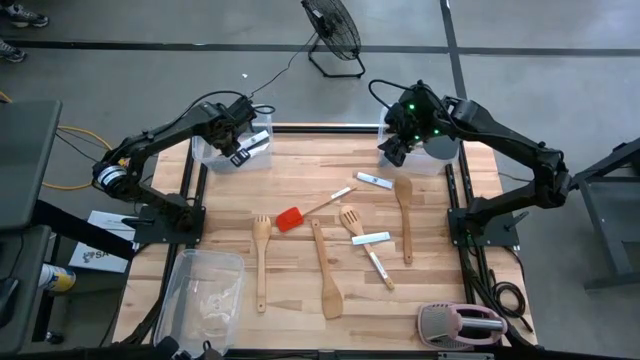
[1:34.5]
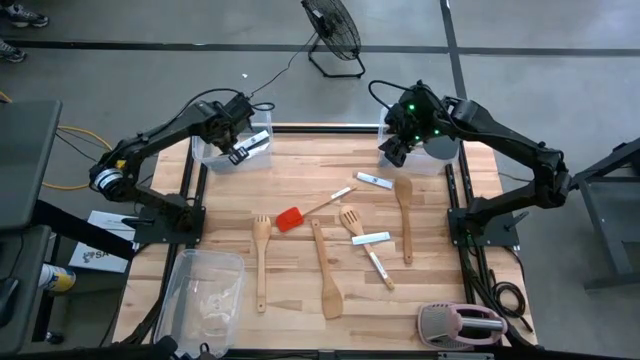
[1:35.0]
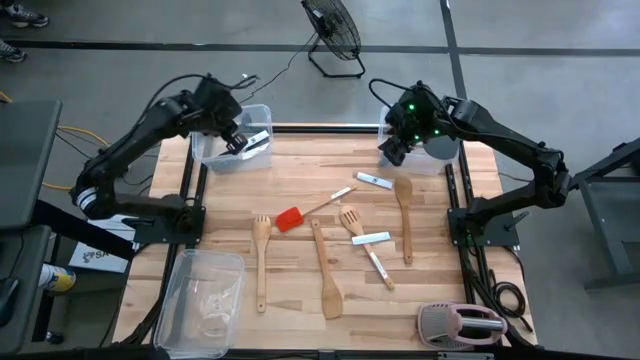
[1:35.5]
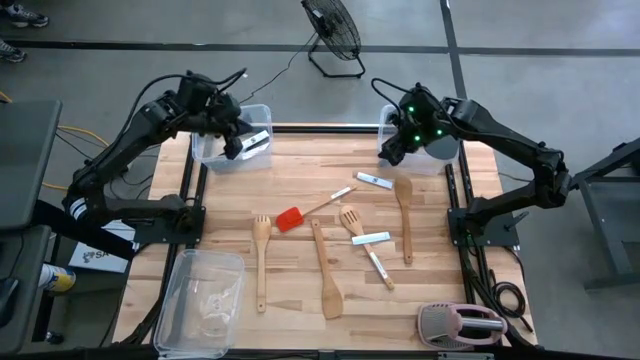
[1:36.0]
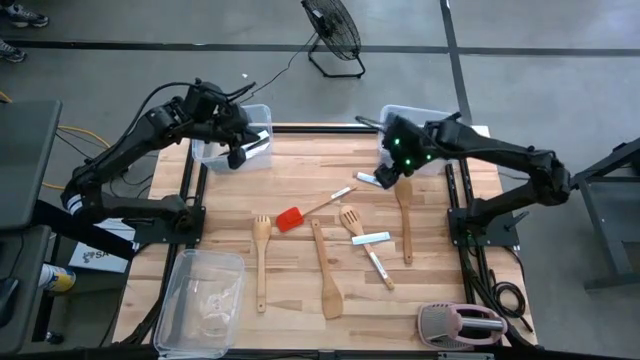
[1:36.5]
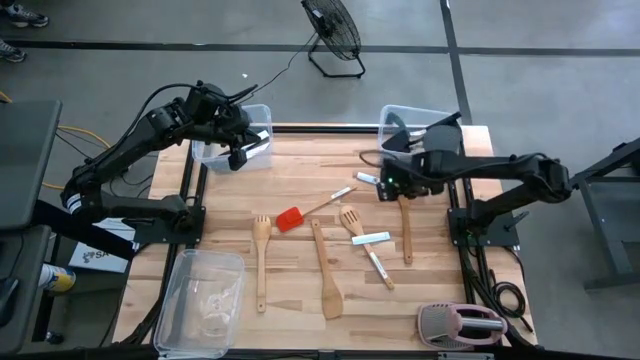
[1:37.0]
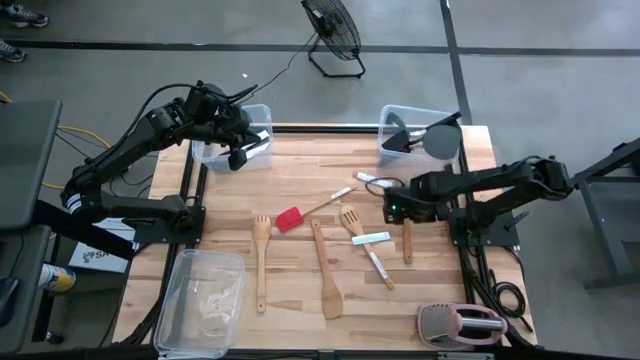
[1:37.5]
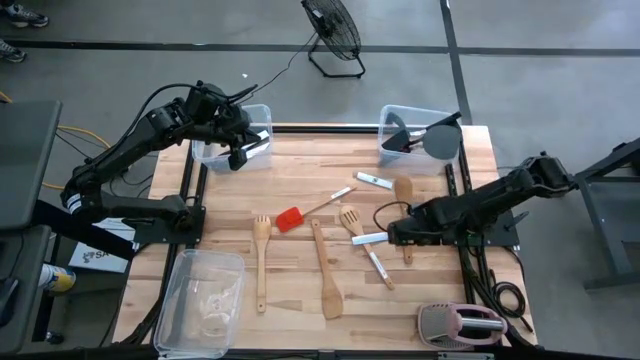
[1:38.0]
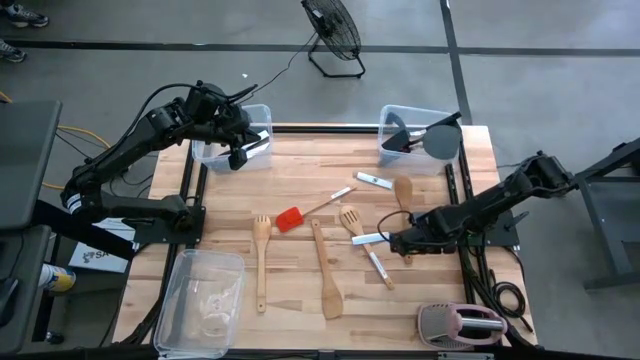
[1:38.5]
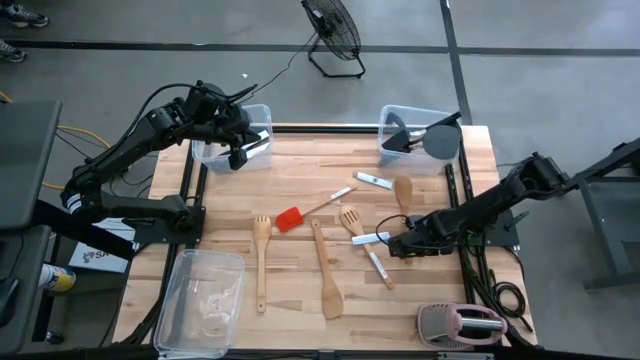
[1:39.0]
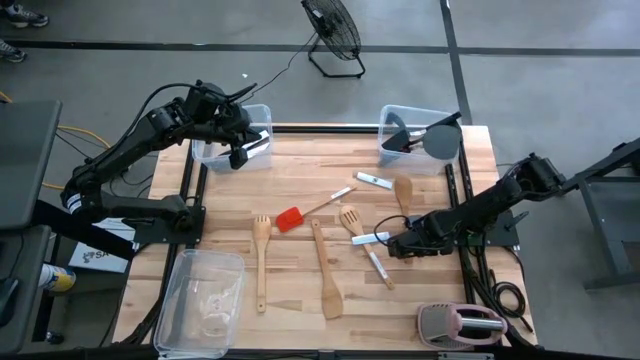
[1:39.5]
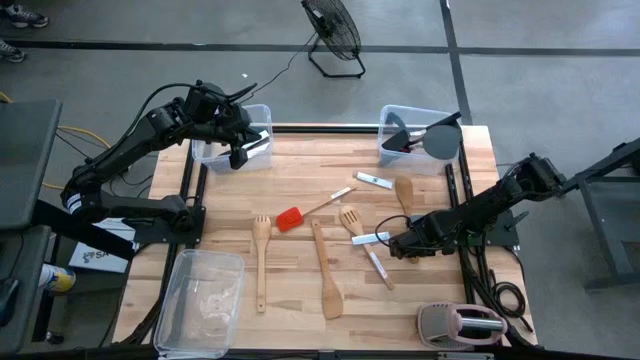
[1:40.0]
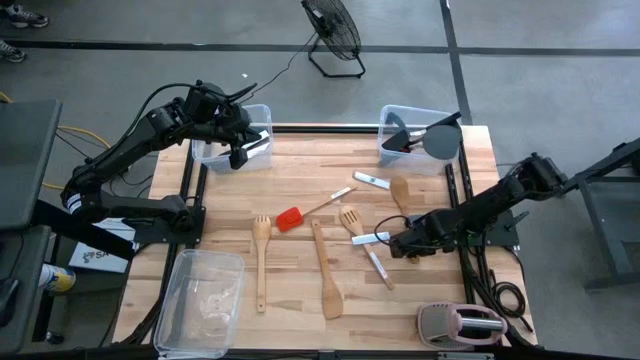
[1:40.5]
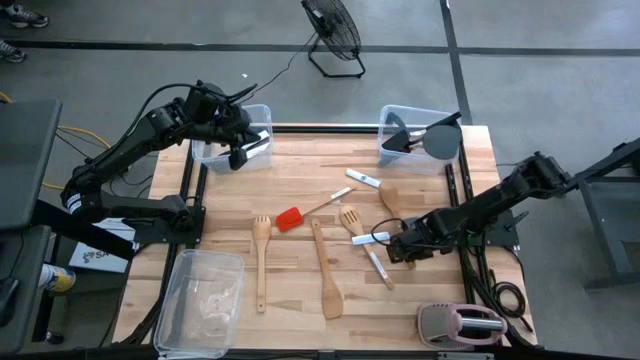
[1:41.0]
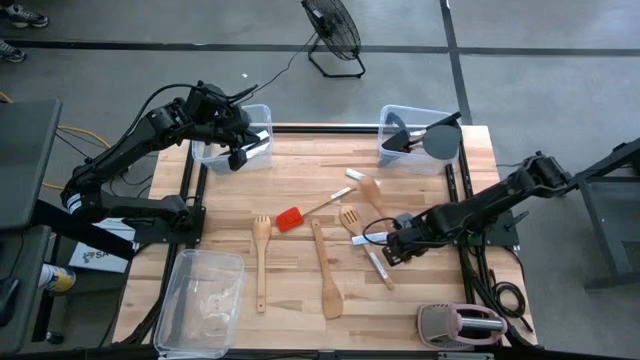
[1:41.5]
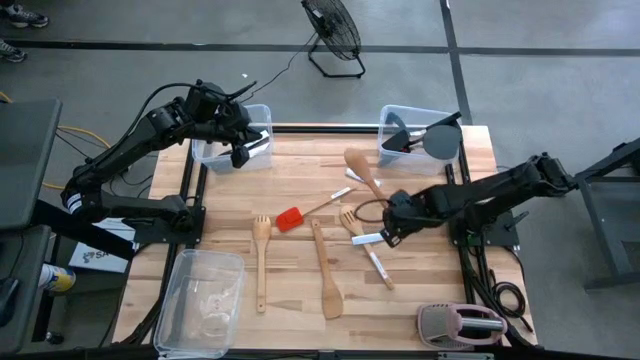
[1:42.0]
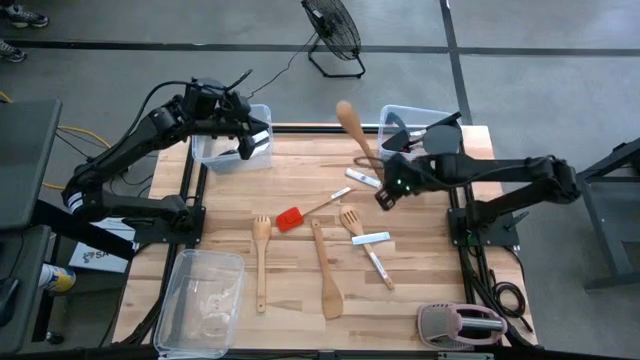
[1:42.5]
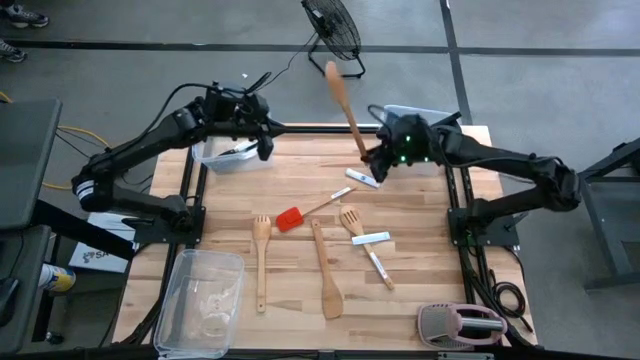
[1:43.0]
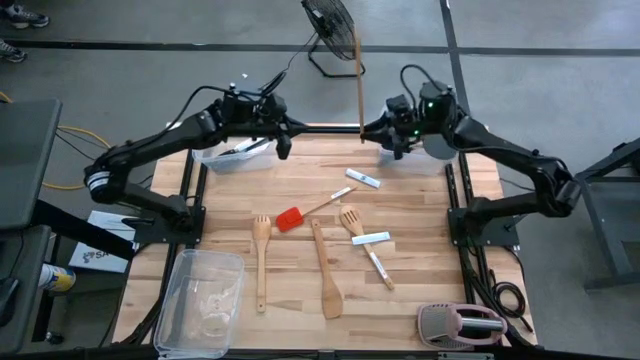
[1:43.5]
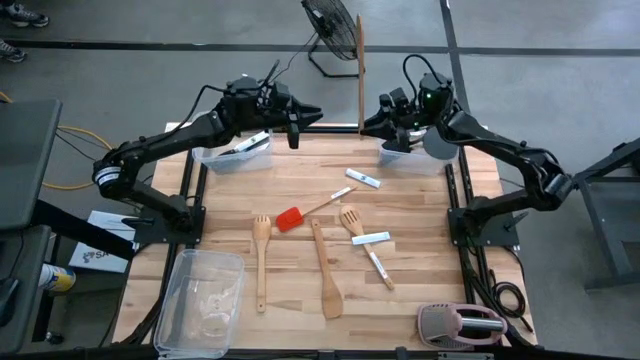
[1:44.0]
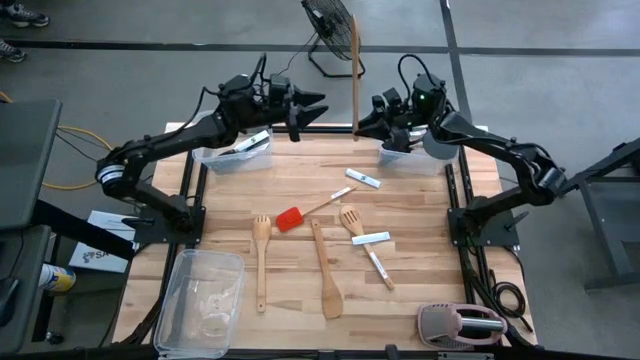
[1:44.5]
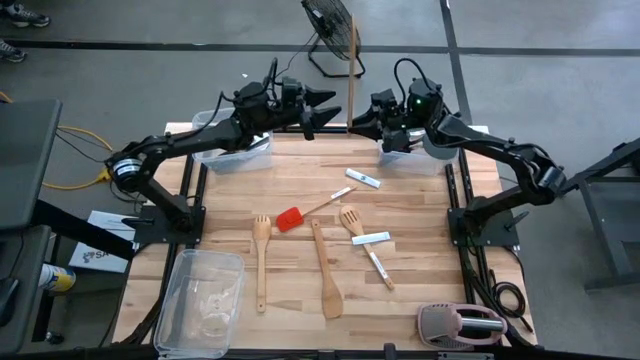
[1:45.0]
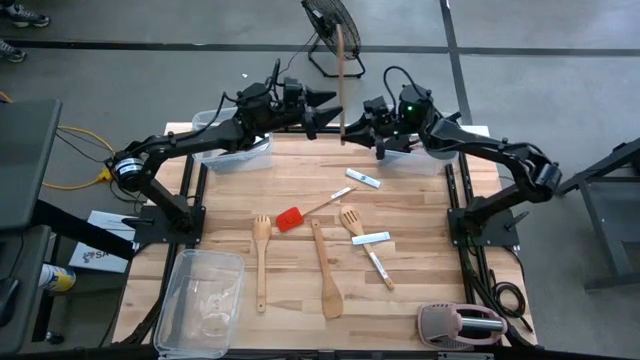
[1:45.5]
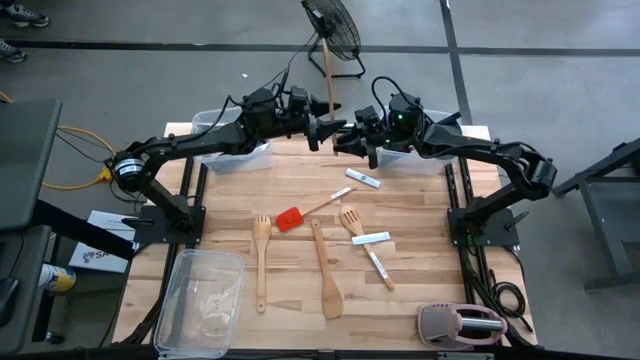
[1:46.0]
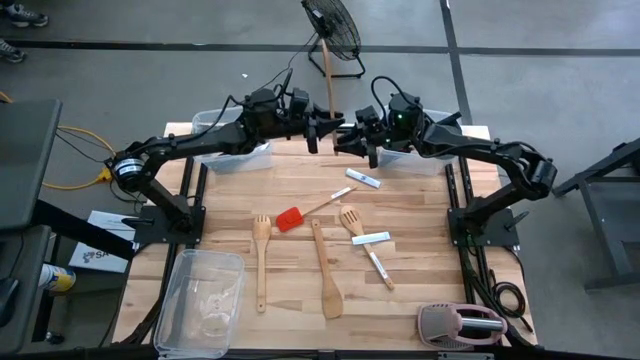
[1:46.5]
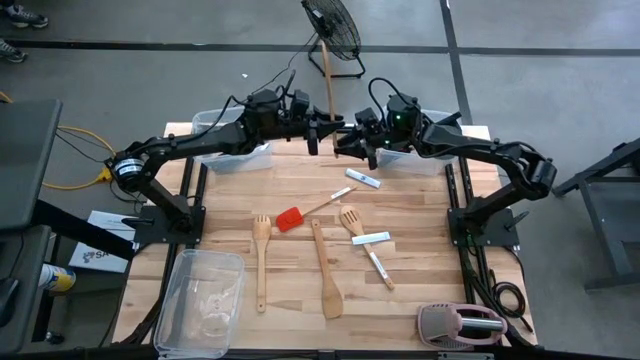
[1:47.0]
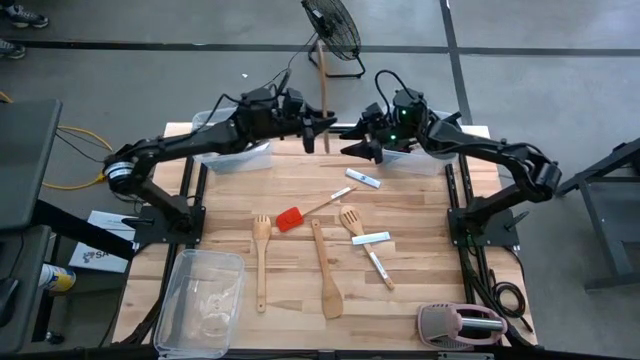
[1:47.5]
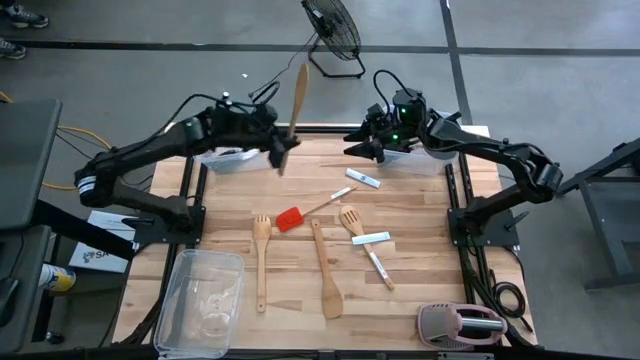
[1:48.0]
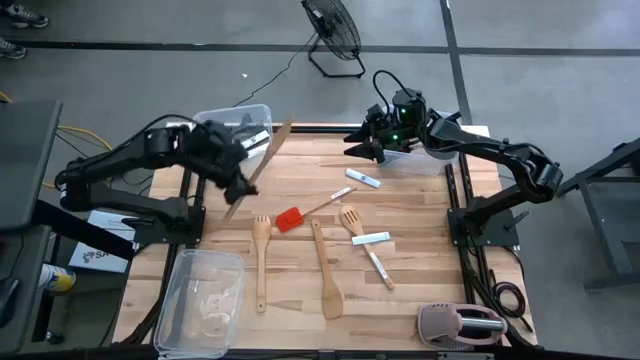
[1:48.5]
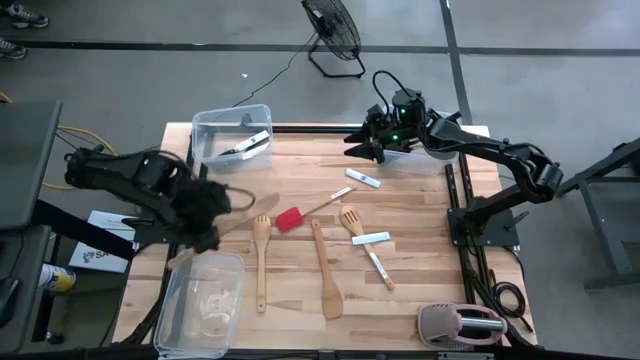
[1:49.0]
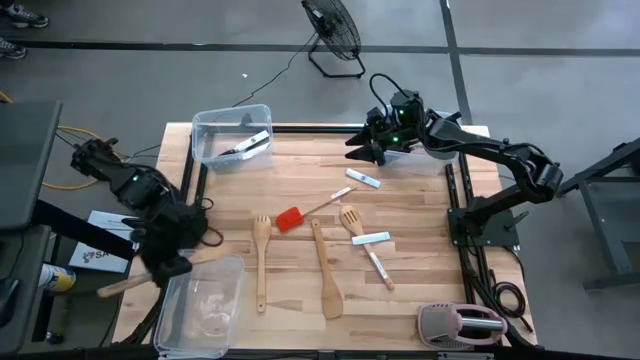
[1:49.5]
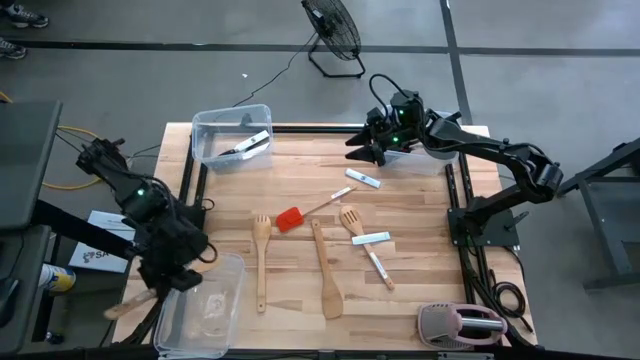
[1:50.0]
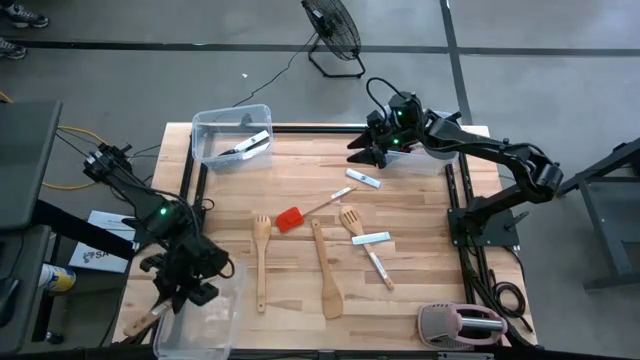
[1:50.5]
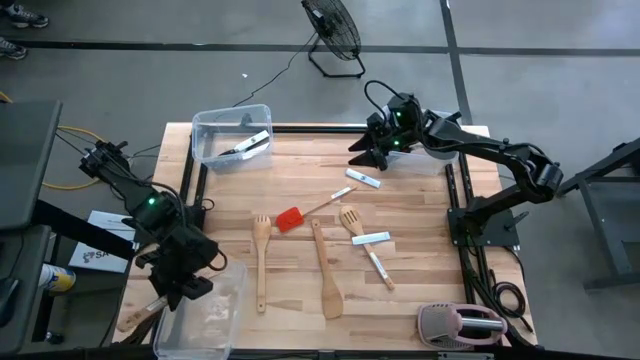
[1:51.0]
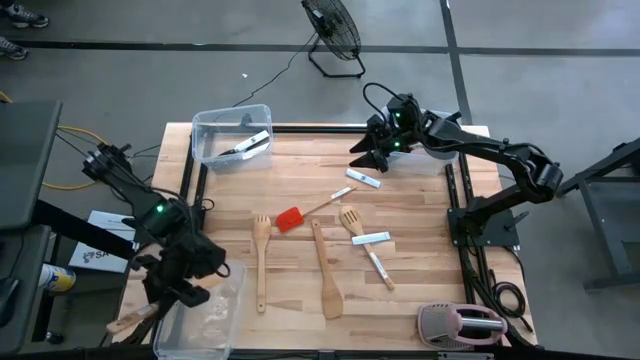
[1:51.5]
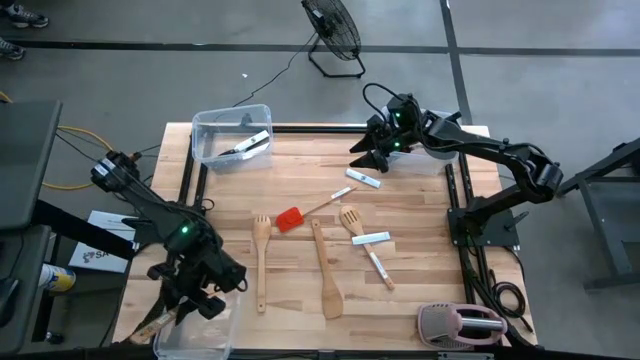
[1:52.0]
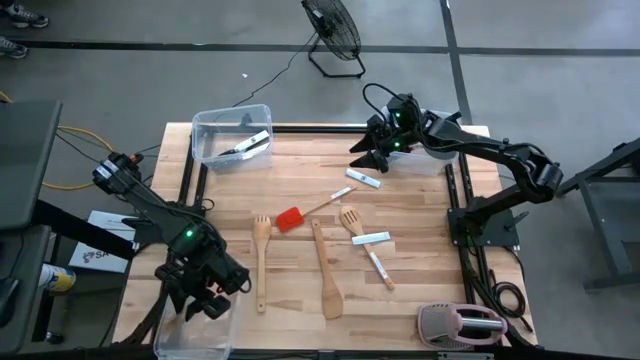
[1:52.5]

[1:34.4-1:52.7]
Task: Pick & Place Kitchen Items
Put the brown serving spoon into the bottom transparent bin

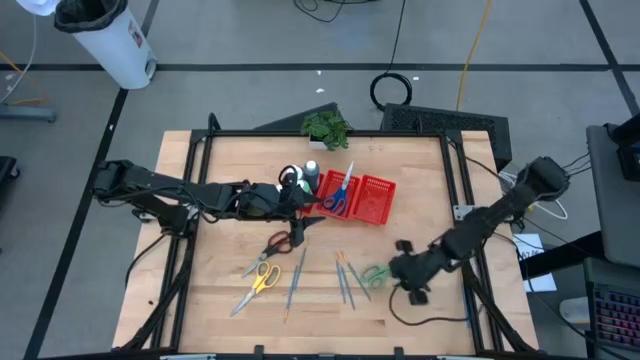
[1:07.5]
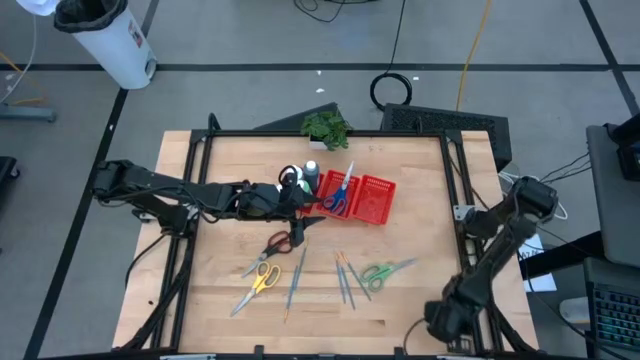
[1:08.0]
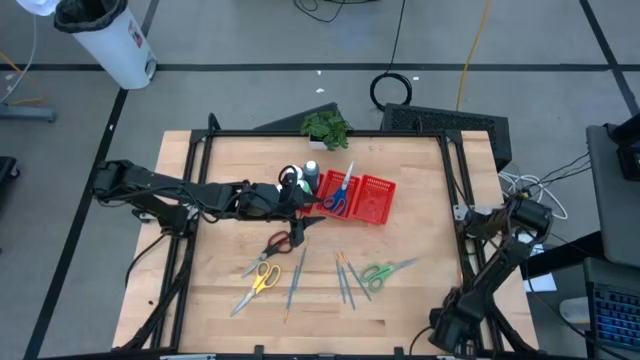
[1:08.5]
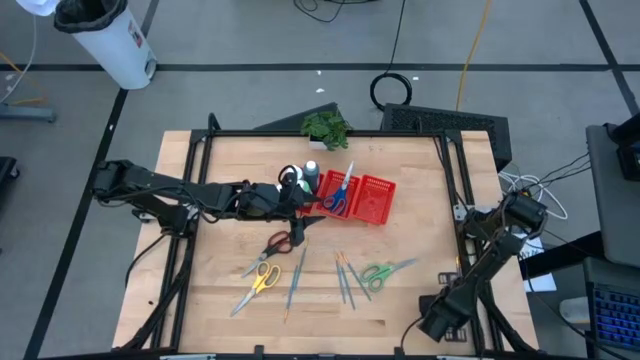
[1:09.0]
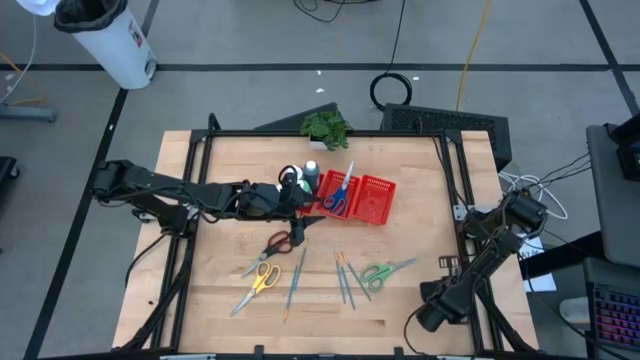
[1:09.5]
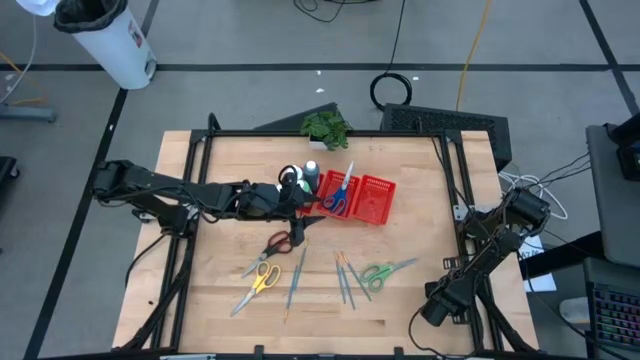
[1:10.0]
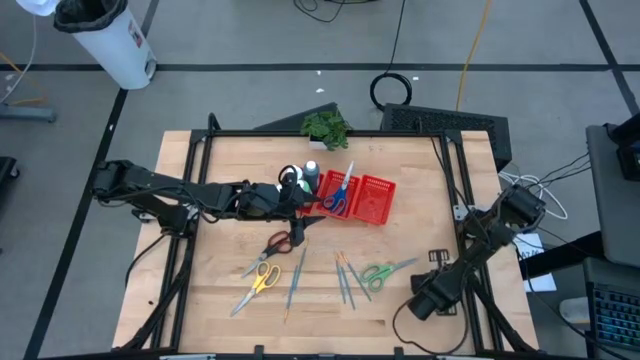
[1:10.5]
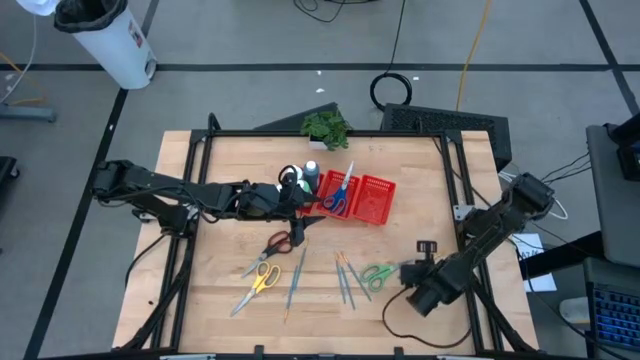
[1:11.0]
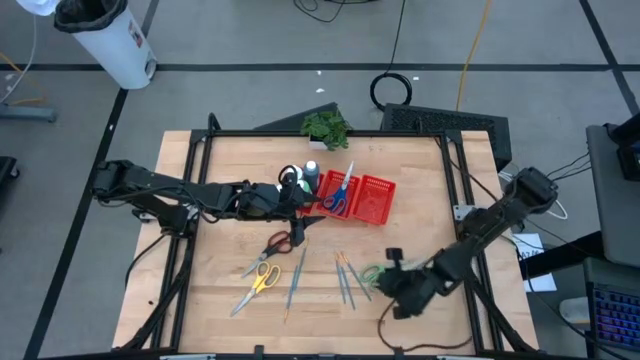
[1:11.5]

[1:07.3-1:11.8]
Task: Pick & Place Paint Supplies
Adjust the blue paint brush on the table

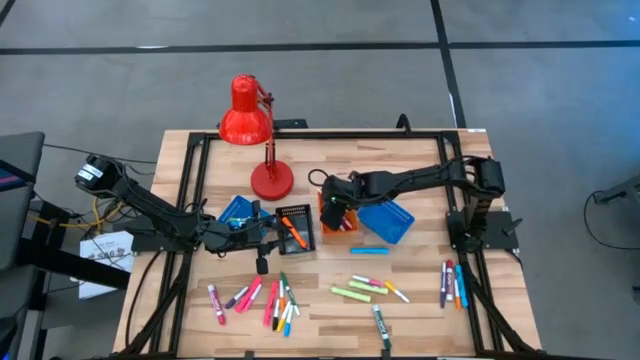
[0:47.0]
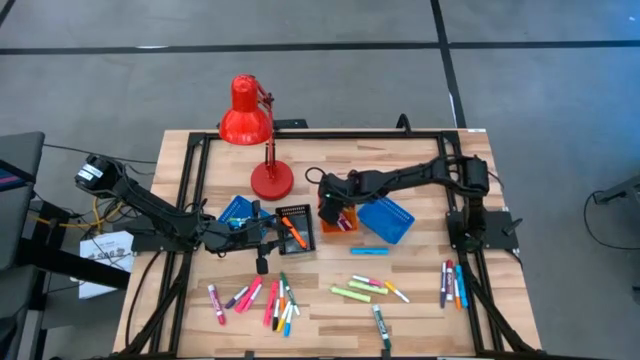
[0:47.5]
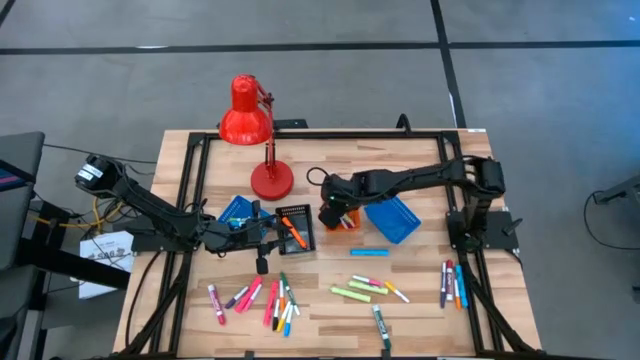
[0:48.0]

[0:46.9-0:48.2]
Task: Pick & Place Markers
Adjust the small light green marker pen in the orange basket
